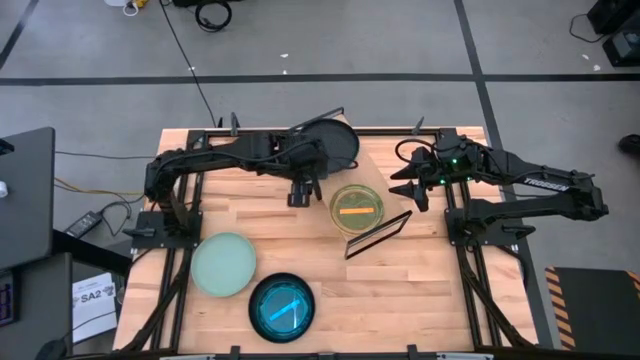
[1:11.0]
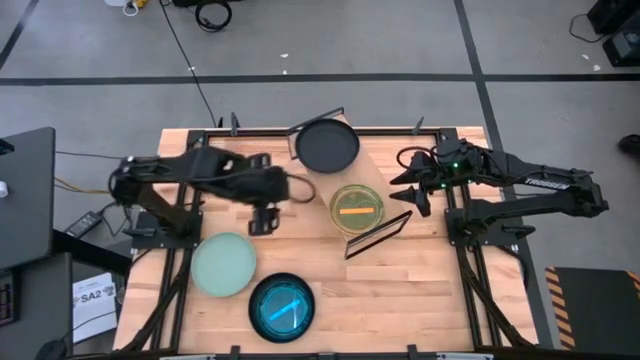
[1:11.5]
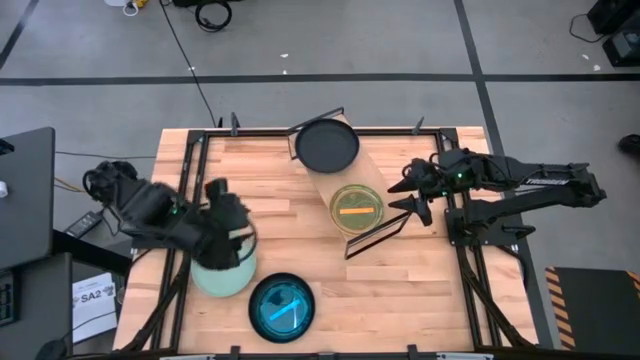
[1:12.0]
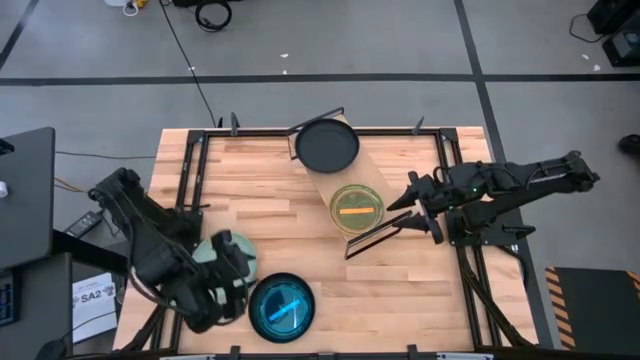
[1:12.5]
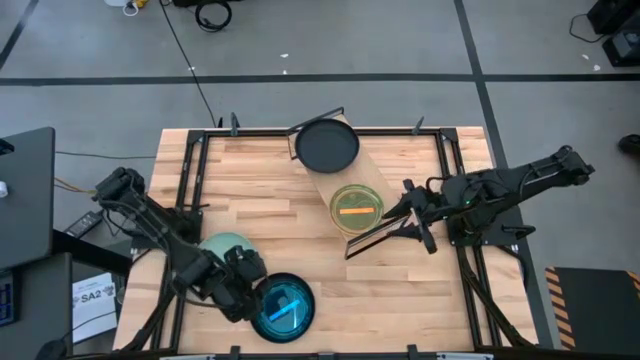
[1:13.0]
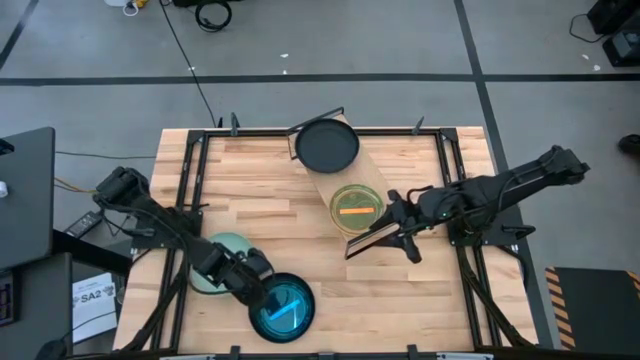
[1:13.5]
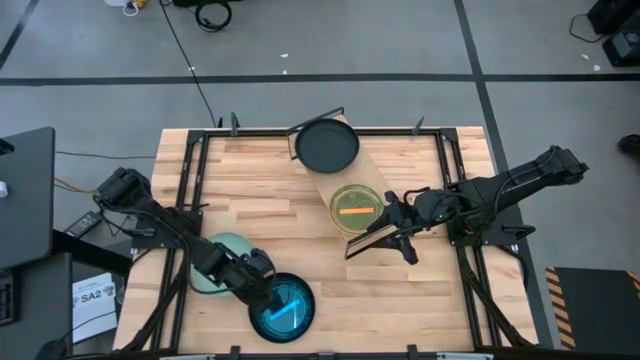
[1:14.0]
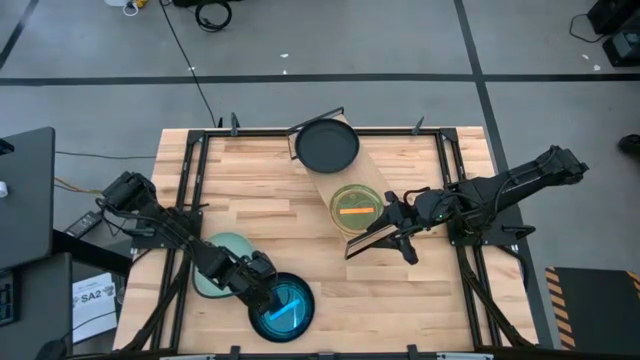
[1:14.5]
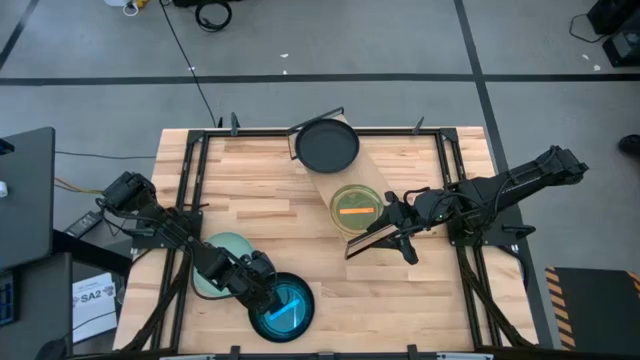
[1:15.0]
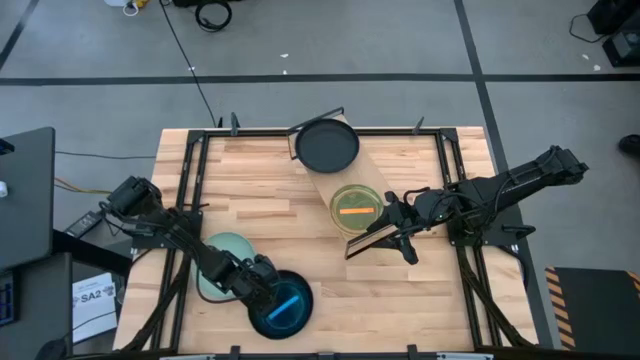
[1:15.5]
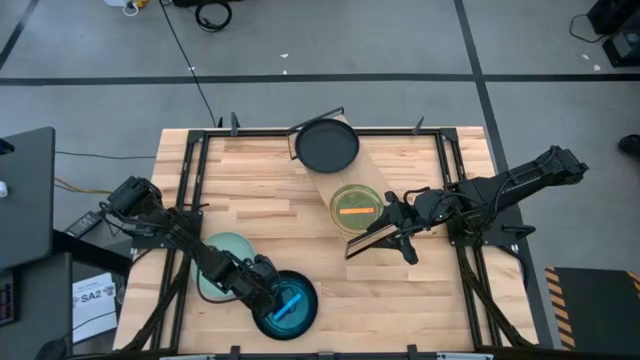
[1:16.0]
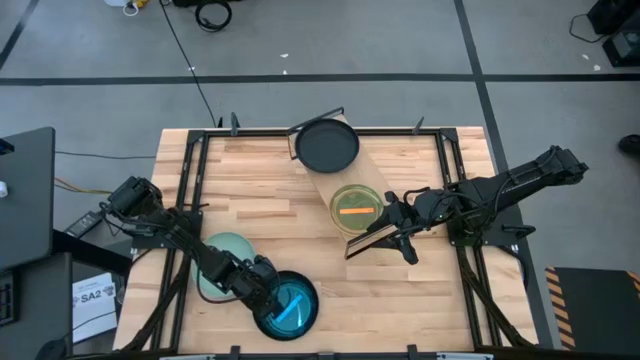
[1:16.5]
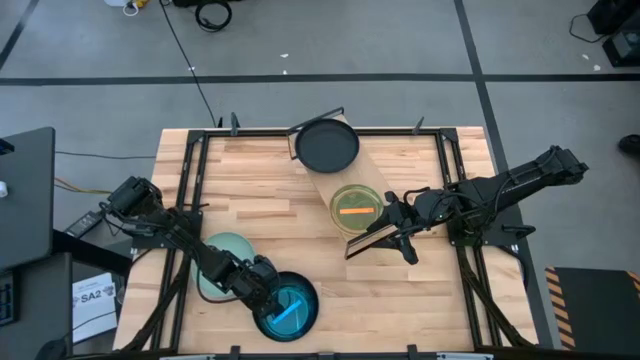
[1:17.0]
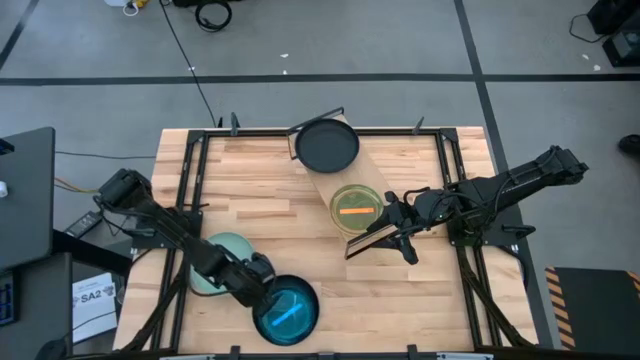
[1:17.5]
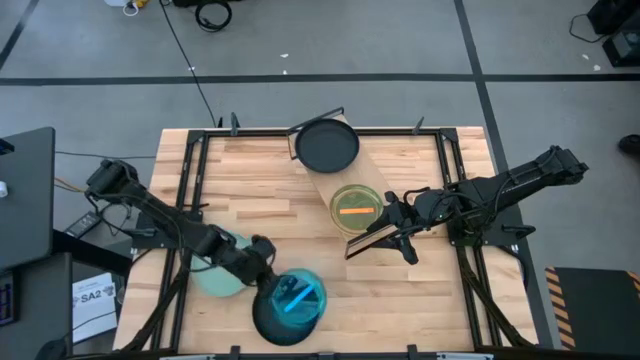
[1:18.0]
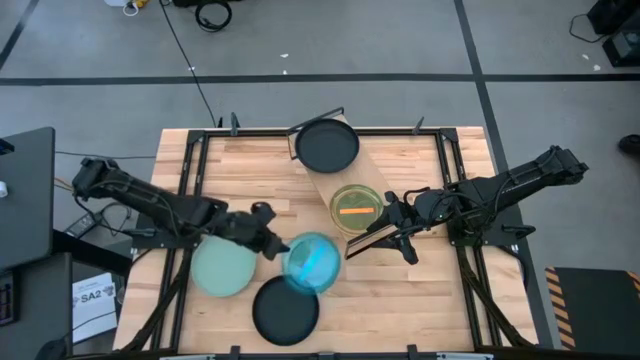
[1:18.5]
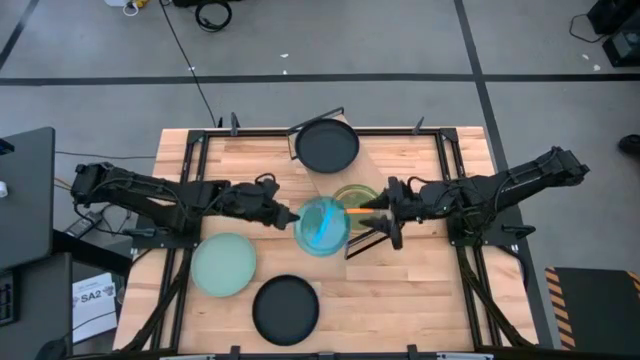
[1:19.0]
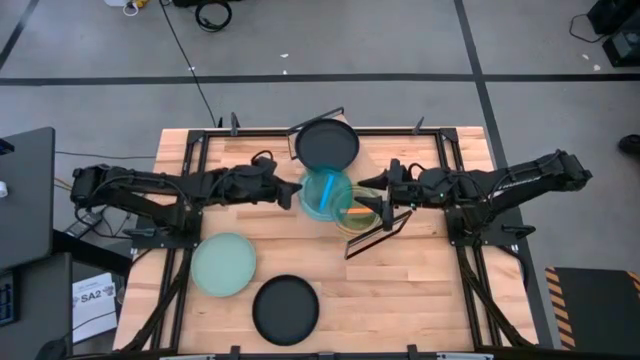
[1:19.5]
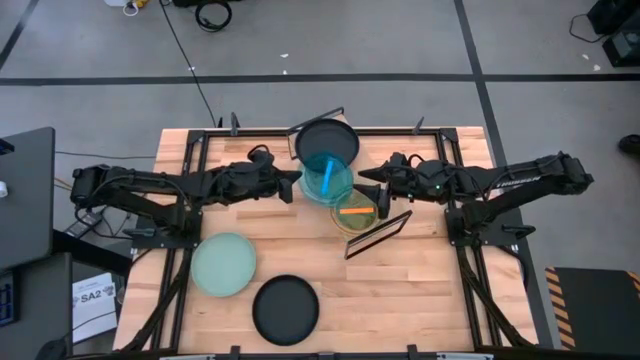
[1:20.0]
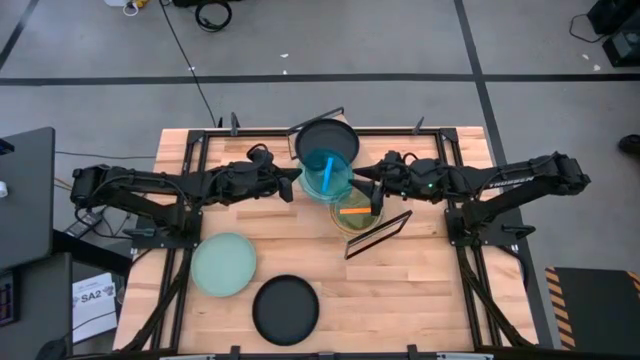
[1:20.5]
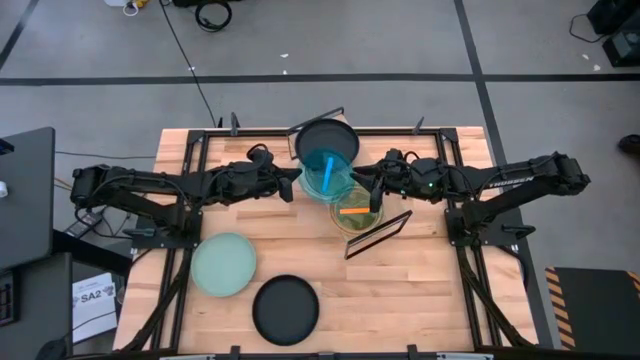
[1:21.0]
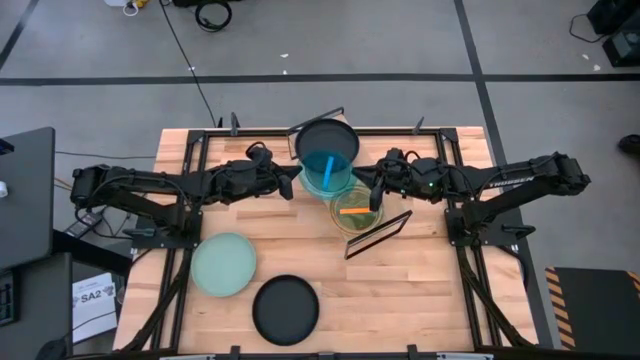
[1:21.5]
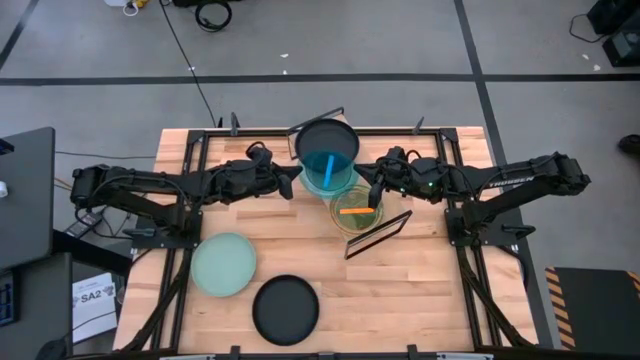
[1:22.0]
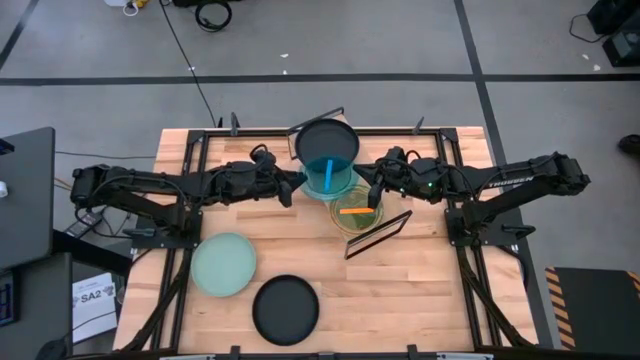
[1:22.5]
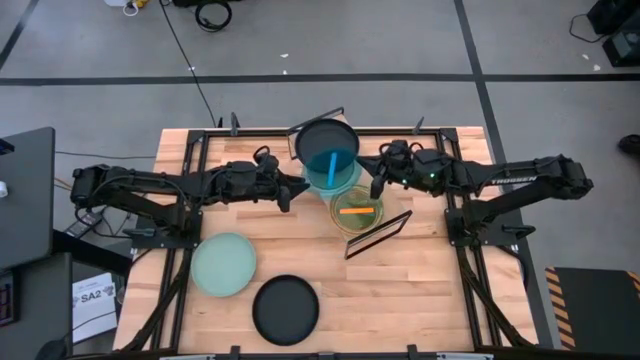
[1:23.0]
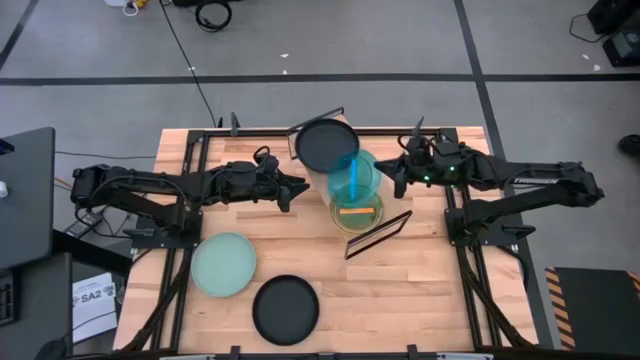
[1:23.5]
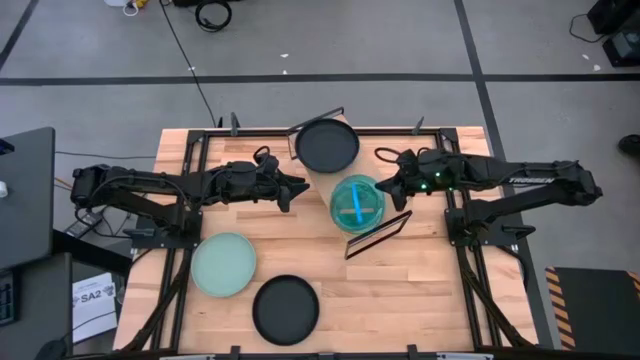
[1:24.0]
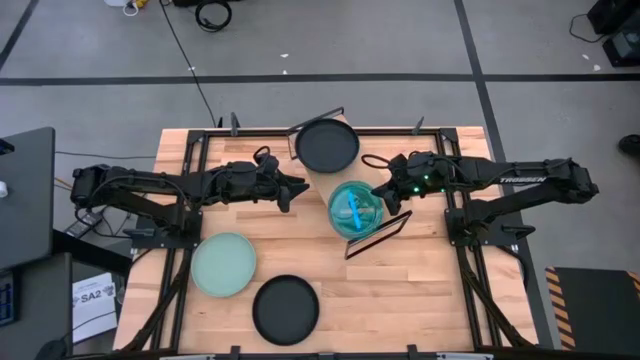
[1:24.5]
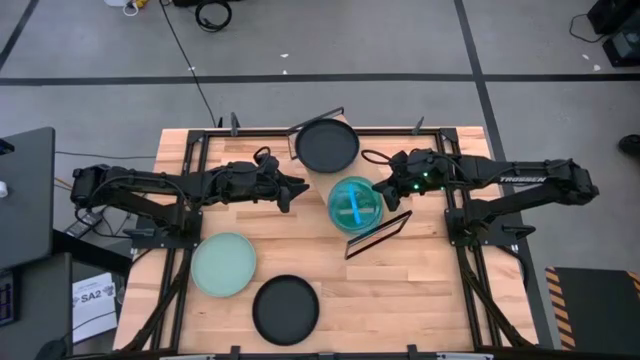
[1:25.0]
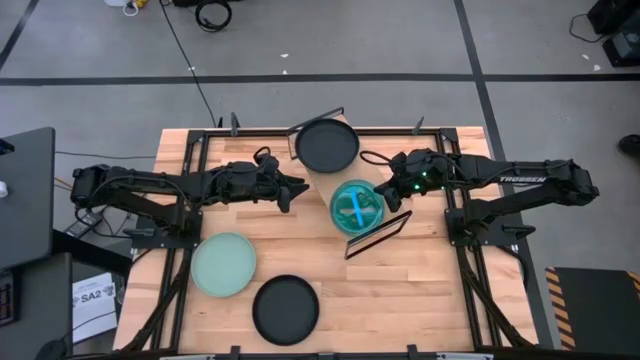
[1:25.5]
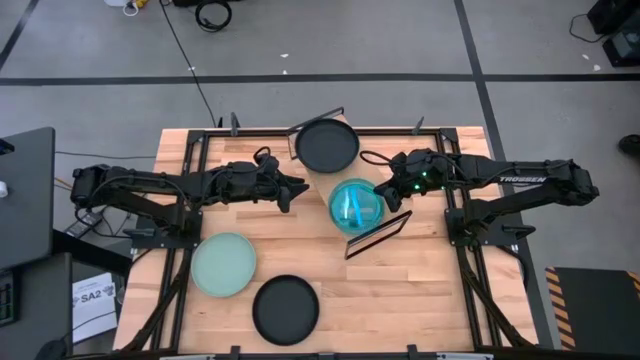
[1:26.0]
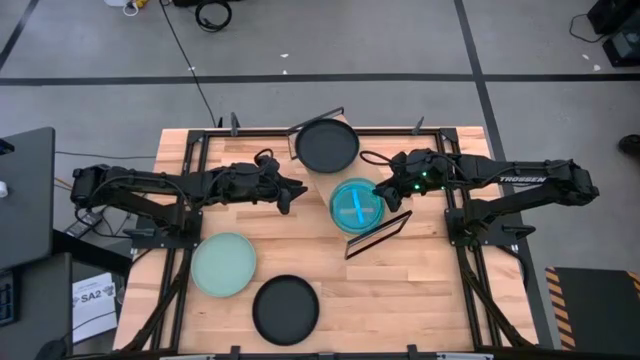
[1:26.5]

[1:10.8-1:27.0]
Task: Place and stack plates onto a shelf
Stack the transparent blue plate on the top of the transparent orange plate on the shelf

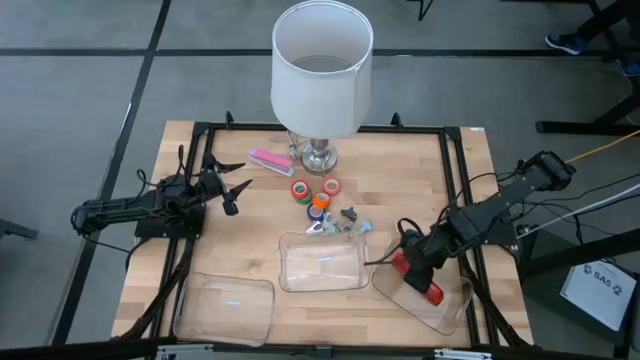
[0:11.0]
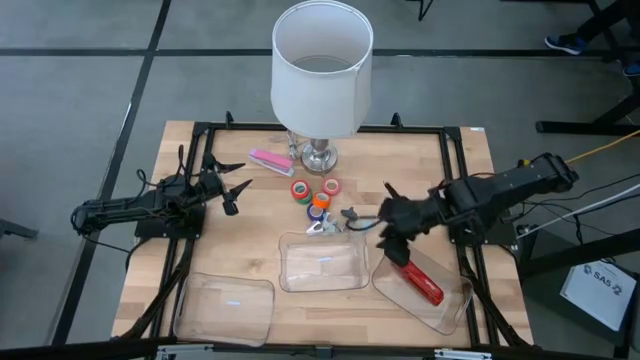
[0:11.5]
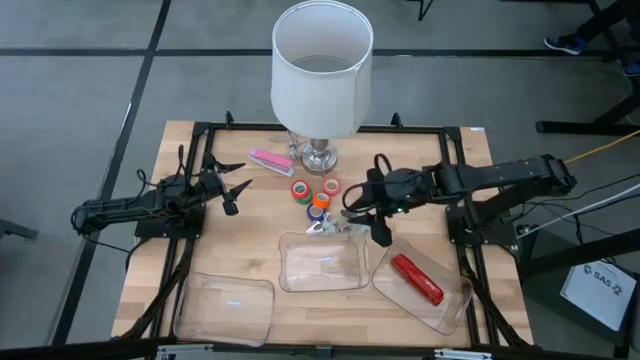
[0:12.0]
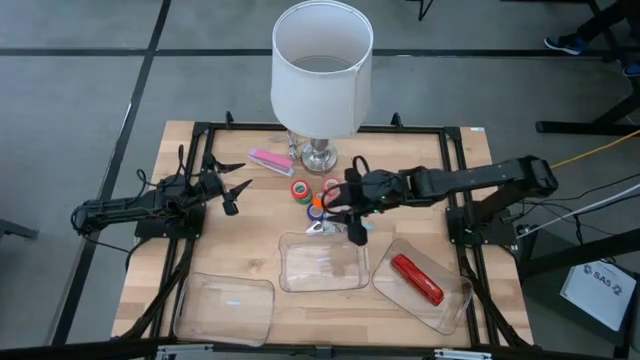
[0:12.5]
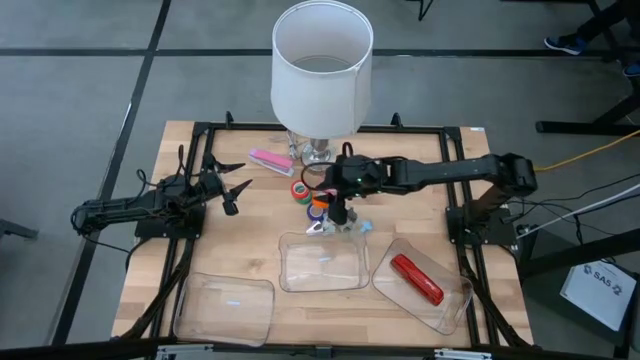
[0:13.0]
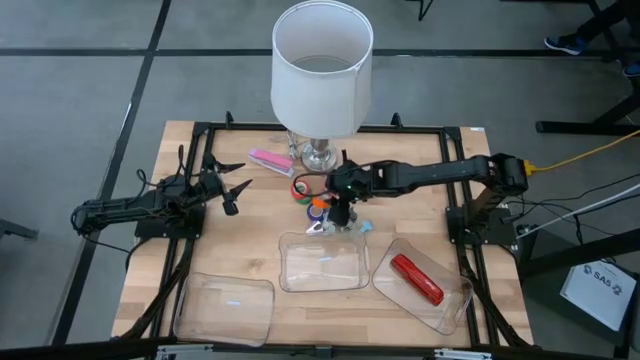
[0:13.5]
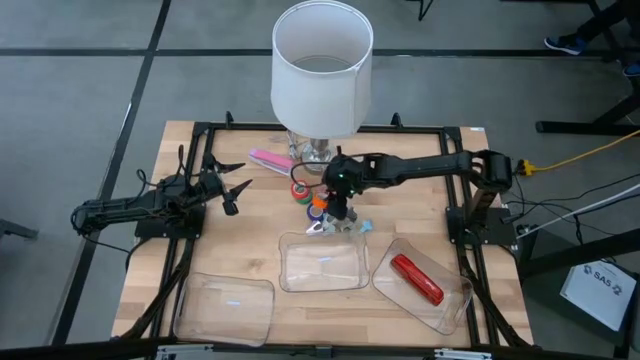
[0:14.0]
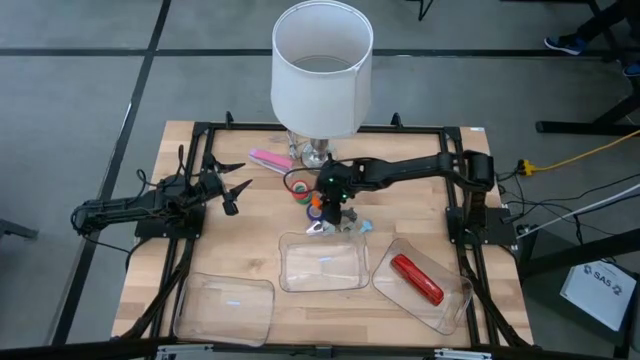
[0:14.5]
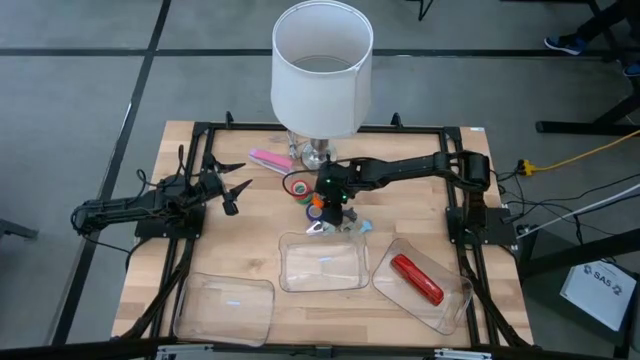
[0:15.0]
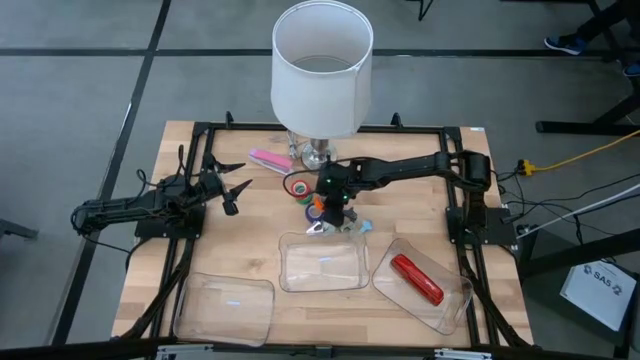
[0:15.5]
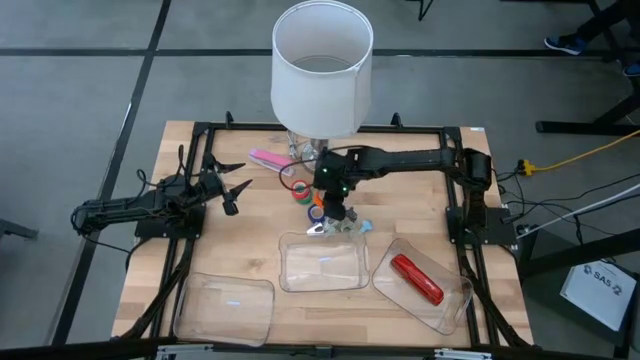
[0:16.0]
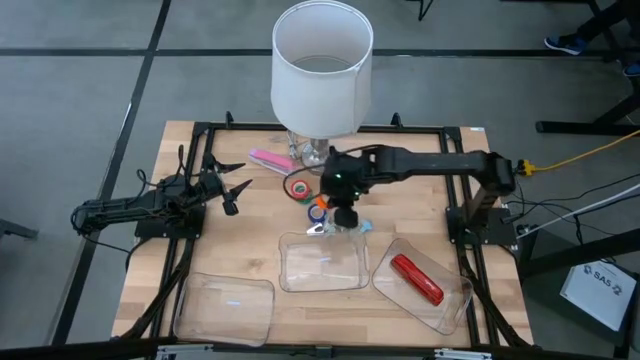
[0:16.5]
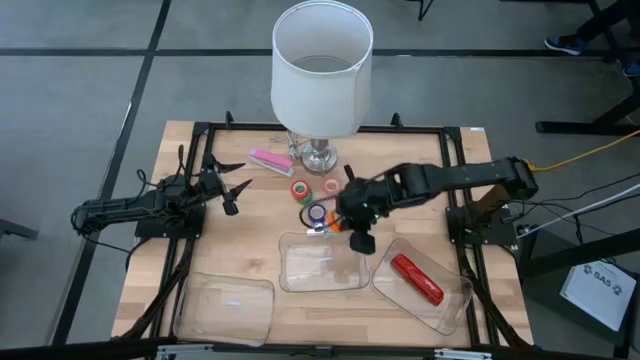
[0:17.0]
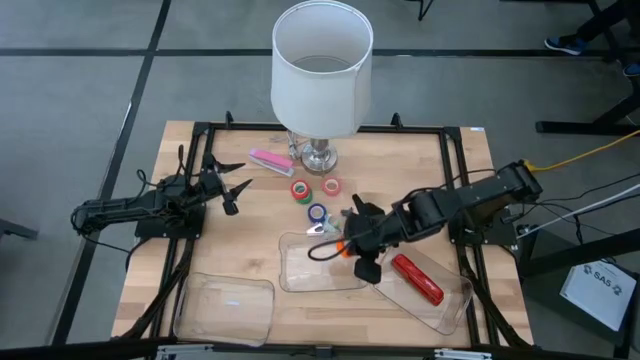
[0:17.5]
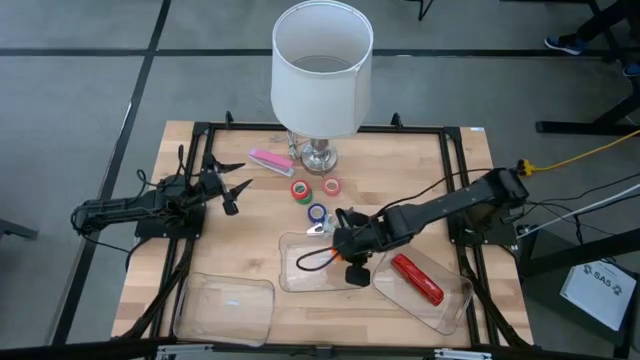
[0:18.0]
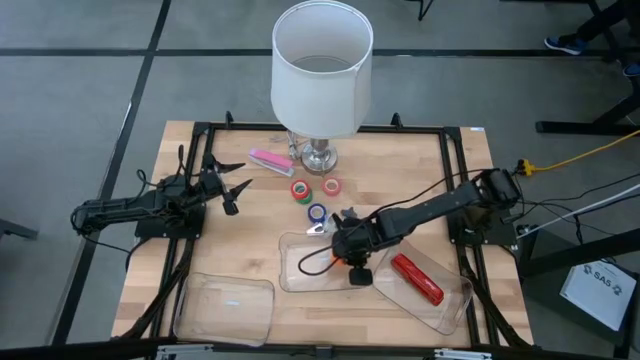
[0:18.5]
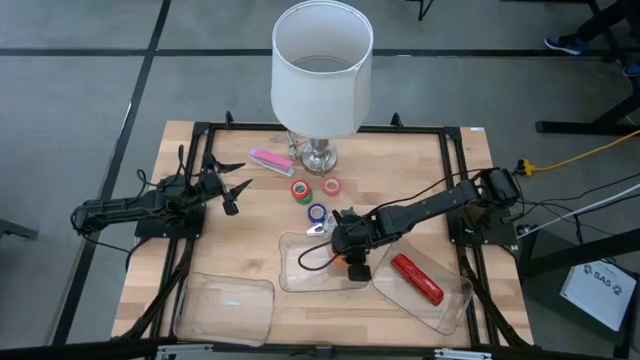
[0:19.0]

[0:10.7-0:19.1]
Task: Pick and place Stapler, Stapler remover, tape
Put the orange tape into the top transparent bin
